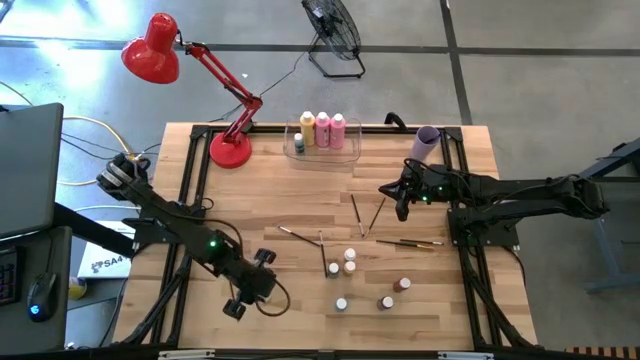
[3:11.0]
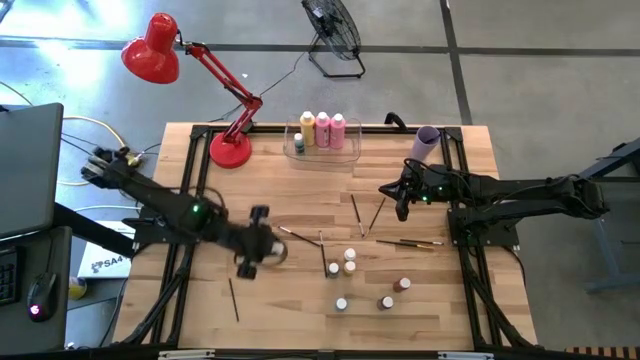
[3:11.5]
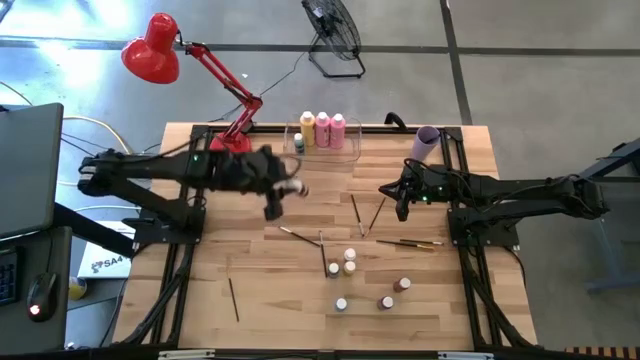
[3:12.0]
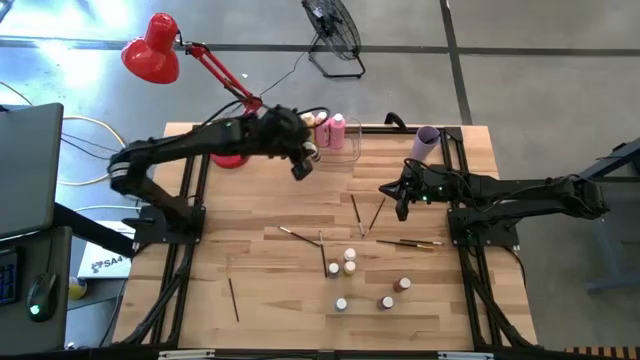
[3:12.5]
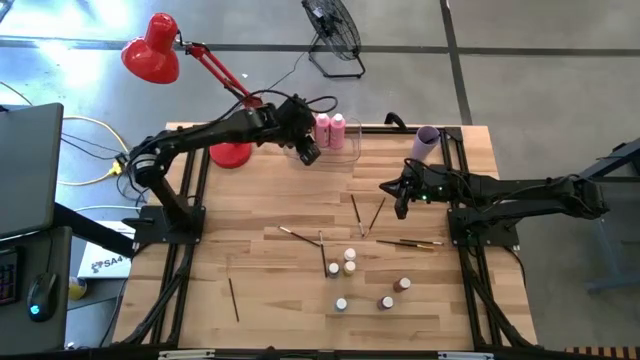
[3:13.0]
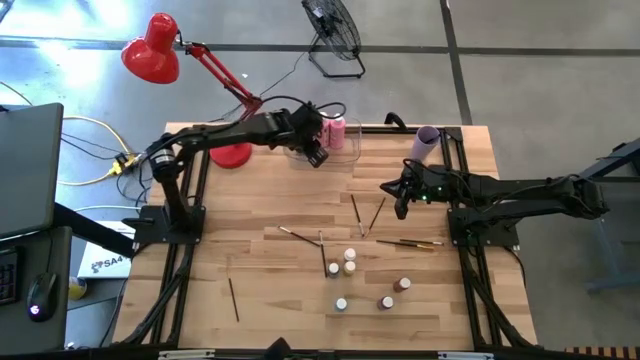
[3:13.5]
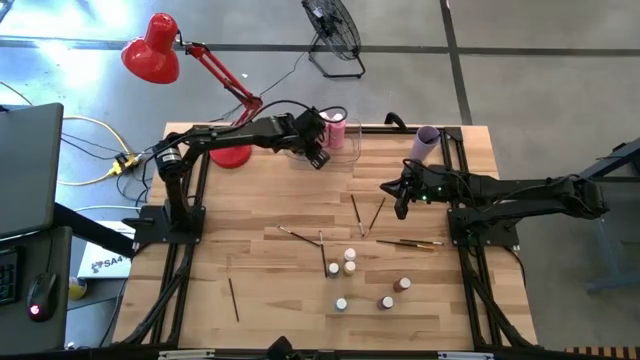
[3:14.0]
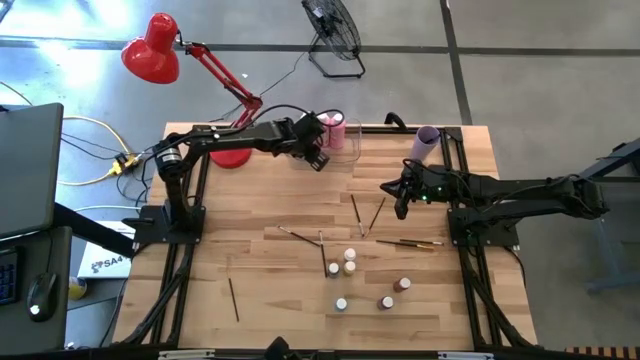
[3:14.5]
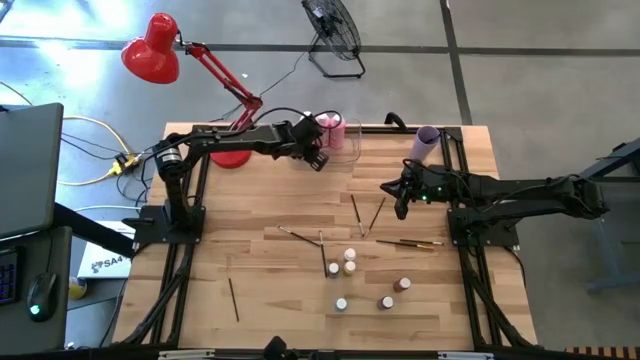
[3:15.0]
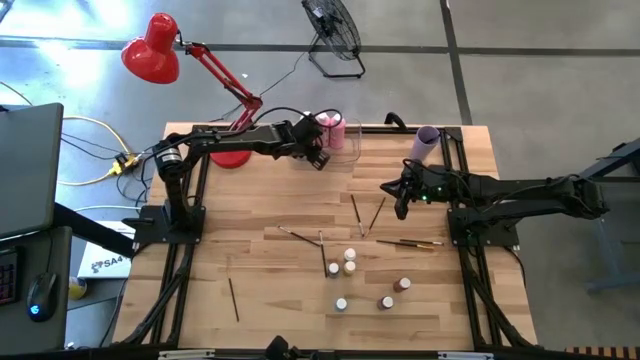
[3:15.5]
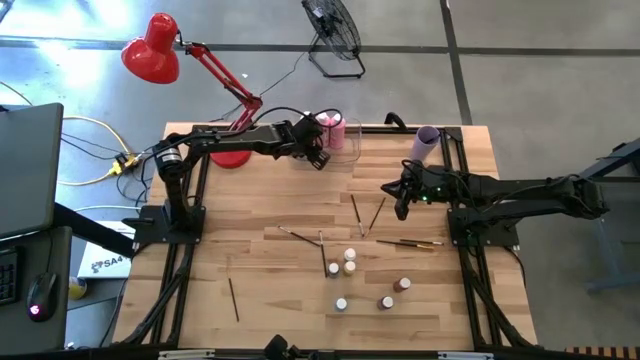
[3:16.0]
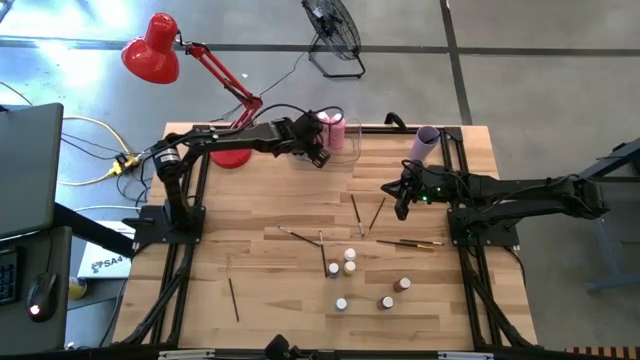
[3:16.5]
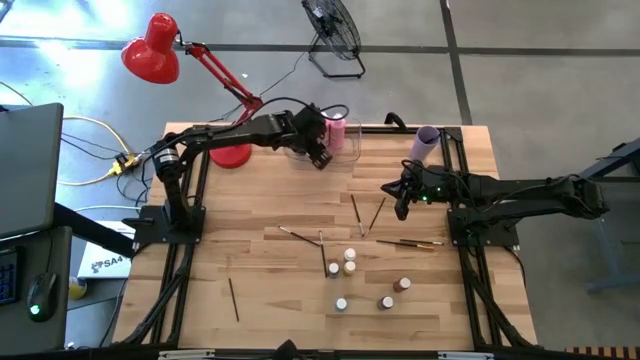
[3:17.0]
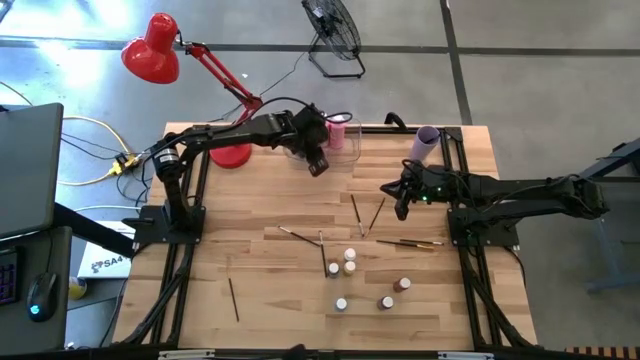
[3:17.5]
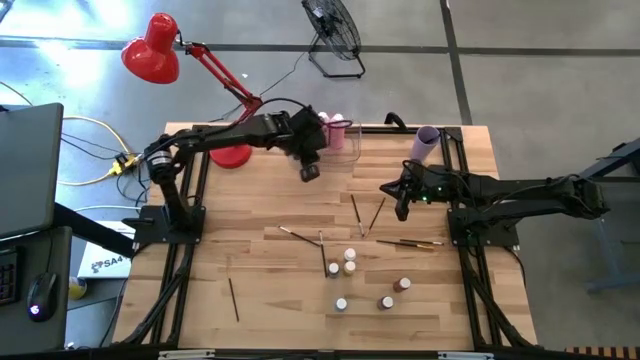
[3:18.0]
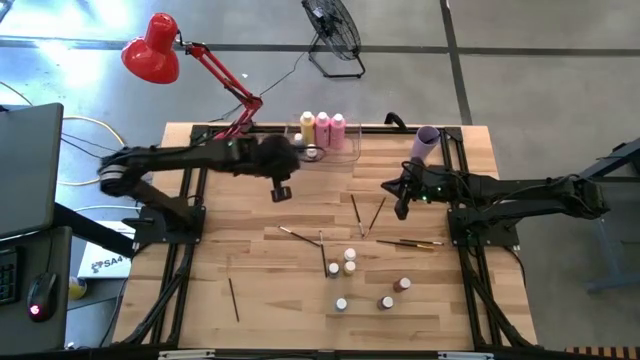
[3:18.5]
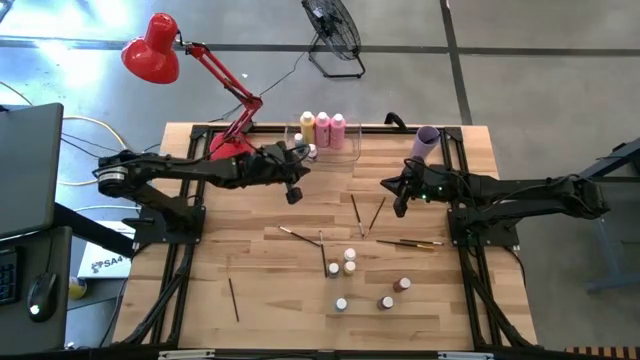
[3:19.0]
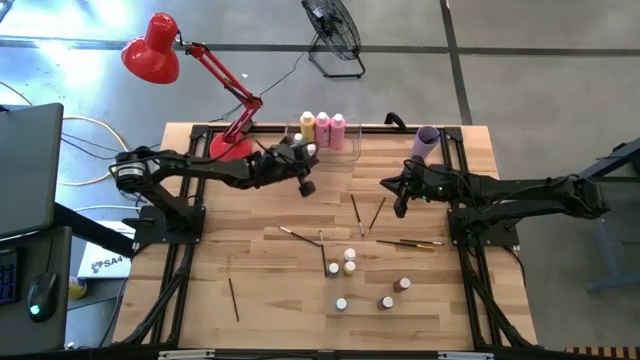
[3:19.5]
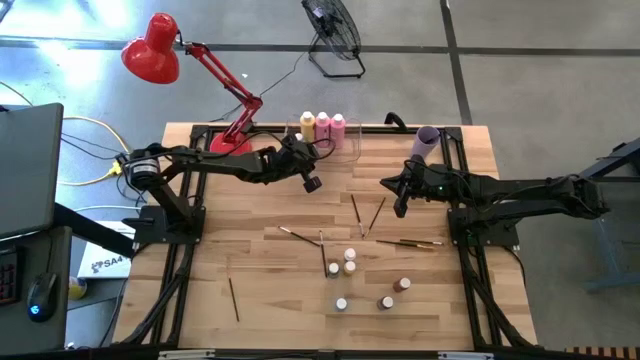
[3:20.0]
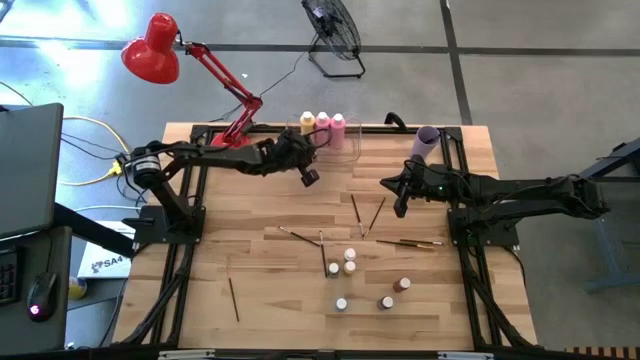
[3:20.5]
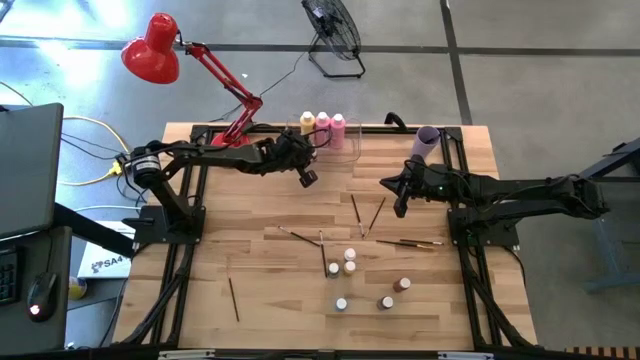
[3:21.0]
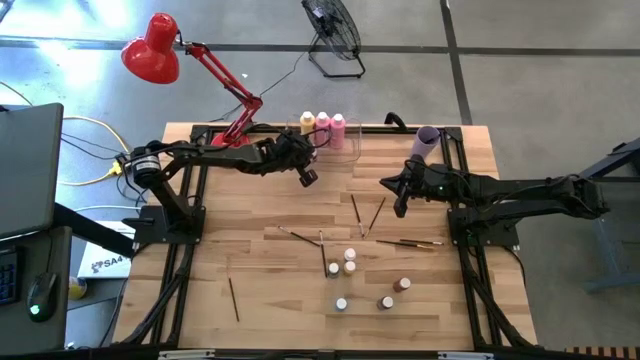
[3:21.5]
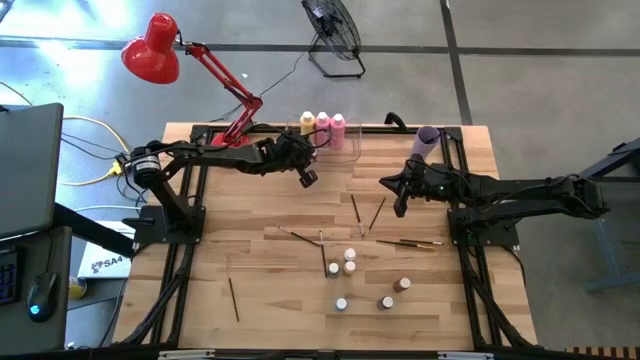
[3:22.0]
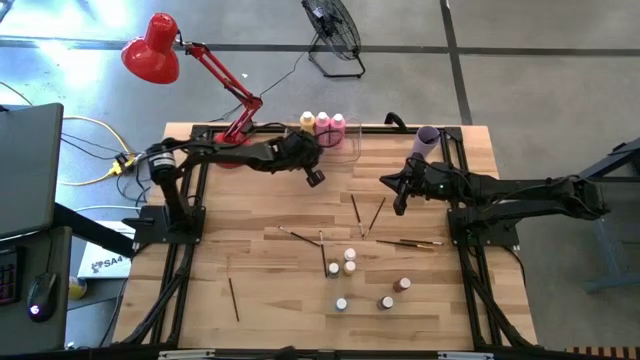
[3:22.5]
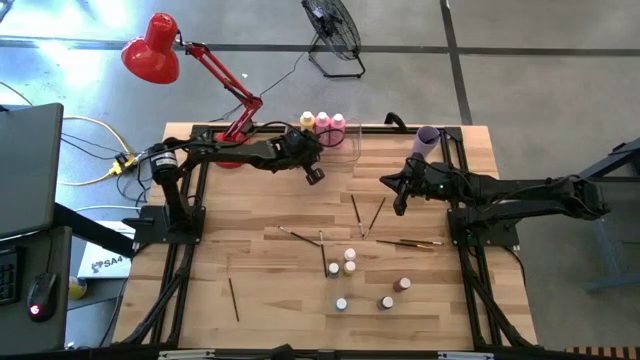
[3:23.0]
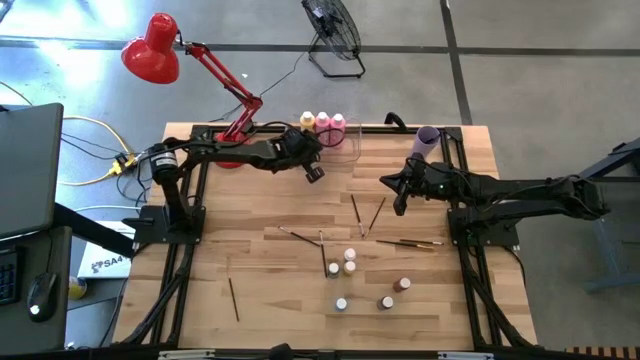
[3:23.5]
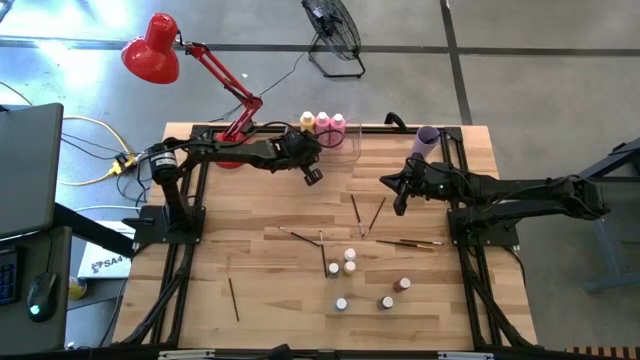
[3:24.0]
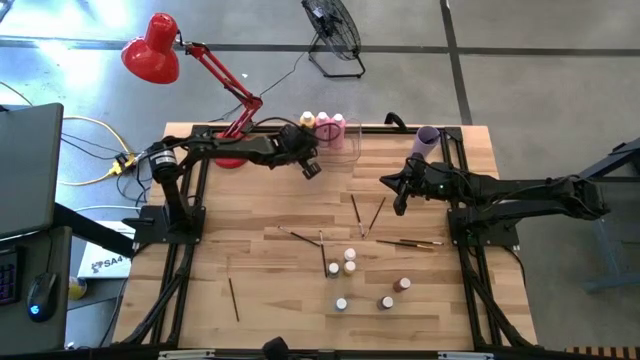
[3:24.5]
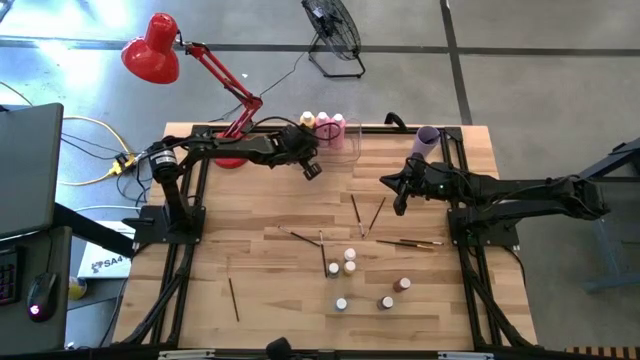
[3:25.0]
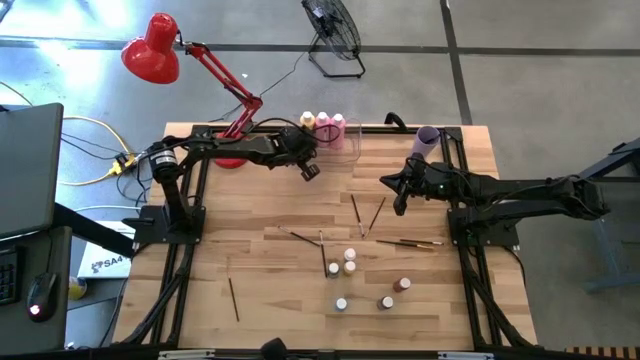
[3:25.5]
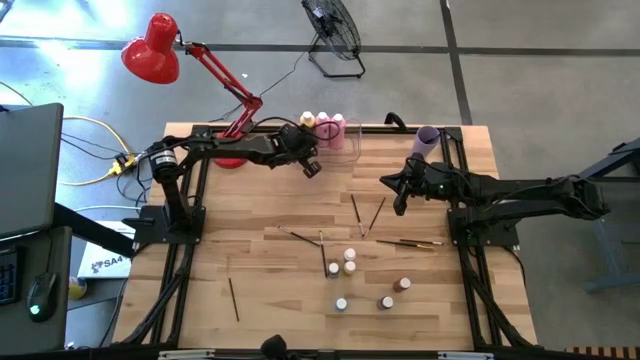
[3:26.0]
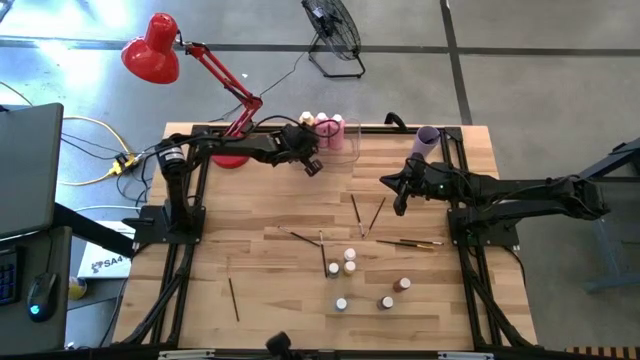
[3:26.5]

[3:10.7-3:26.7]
Task: Pick & Place Paint Supplies
Put the small white paint bottle into the transparent bin

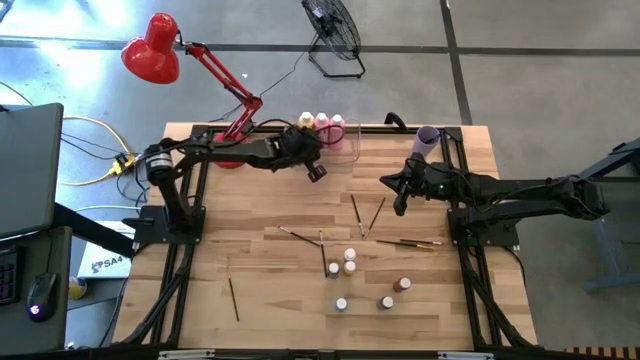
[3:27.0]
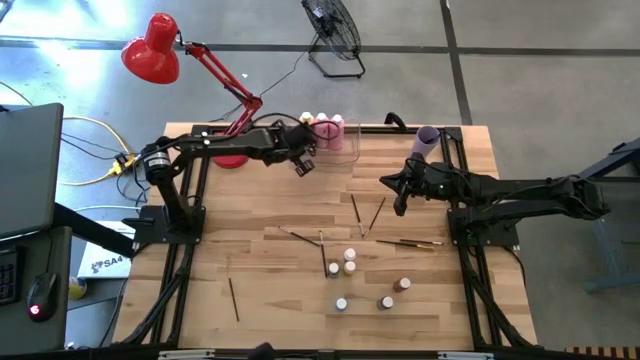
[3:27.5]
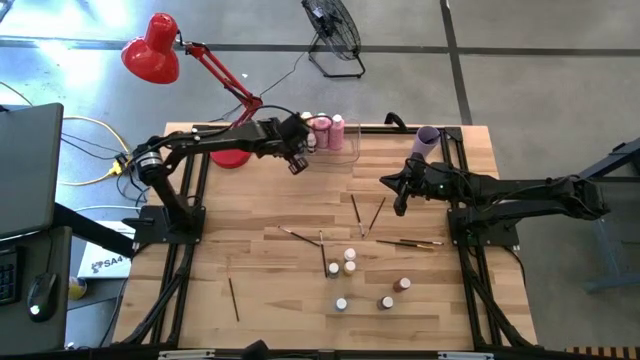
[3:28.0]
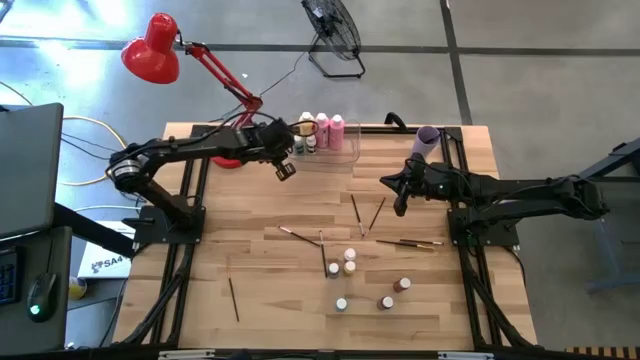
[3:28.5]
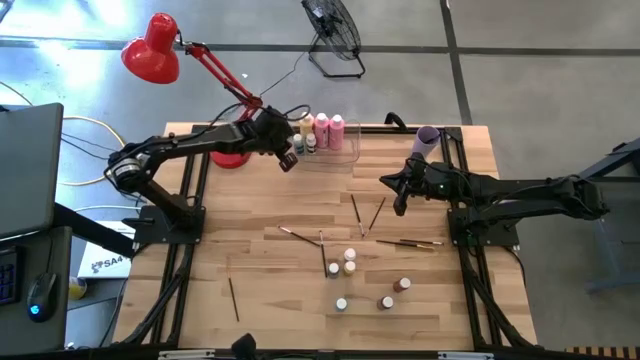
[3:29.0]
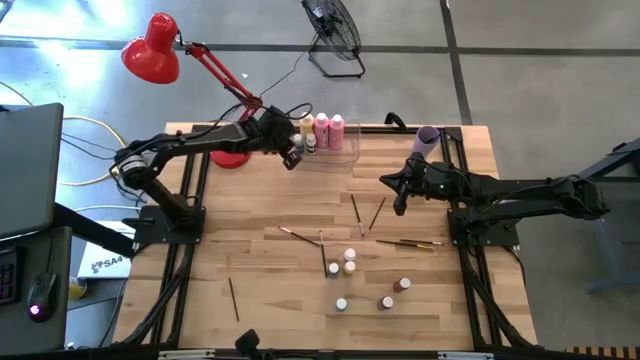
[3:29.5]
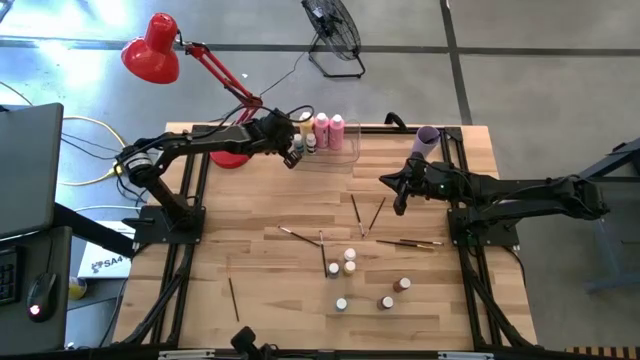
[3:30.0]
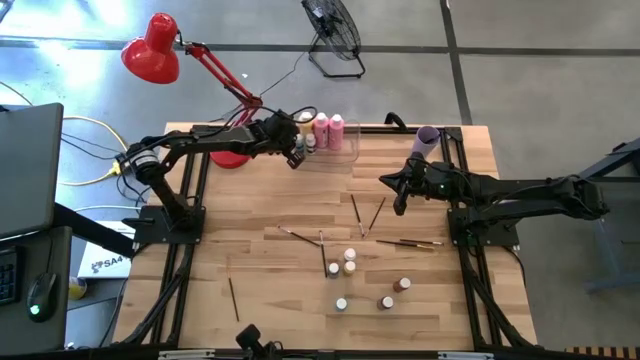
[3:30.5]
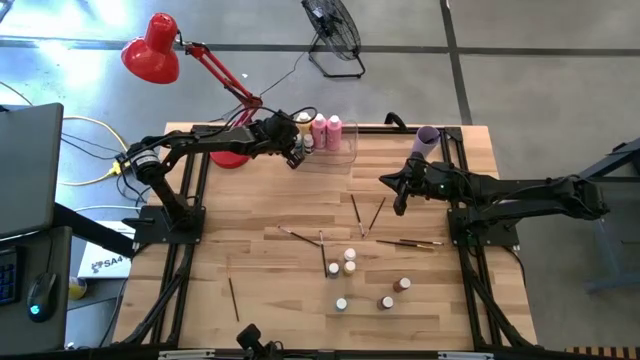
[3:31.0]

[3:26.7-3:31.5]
Adjust the small green paint bottle in the transparent bin

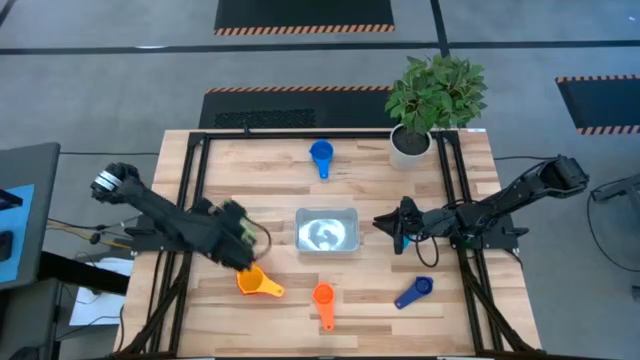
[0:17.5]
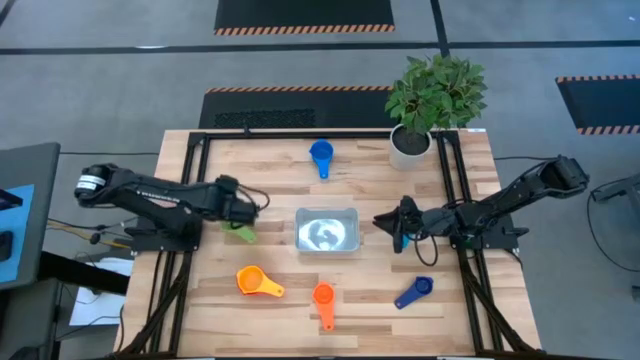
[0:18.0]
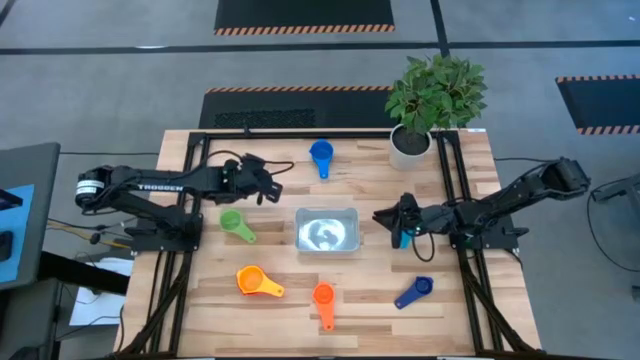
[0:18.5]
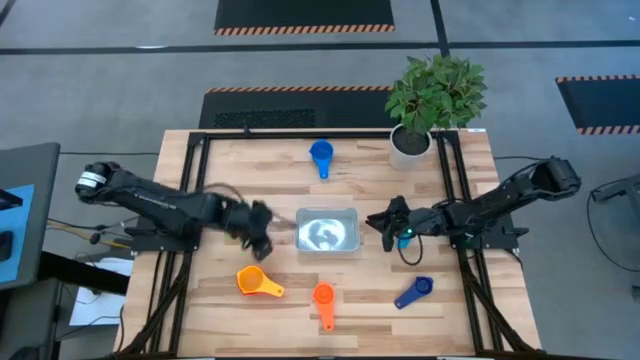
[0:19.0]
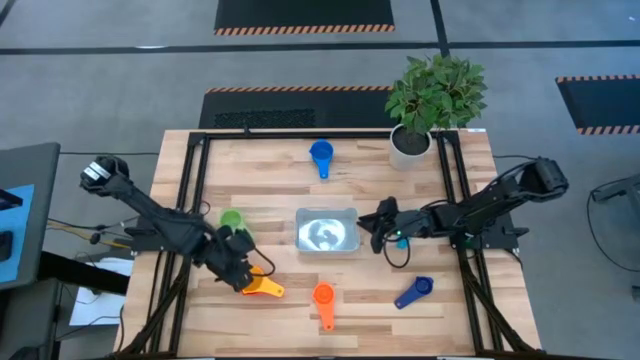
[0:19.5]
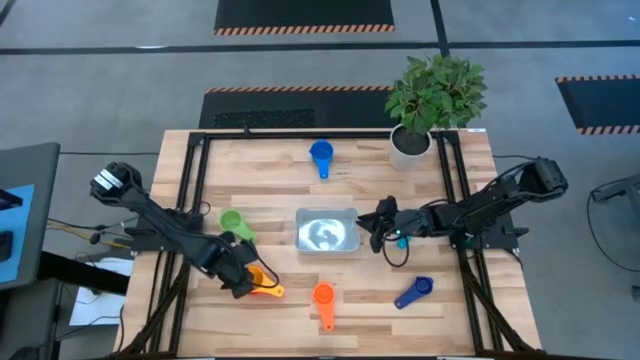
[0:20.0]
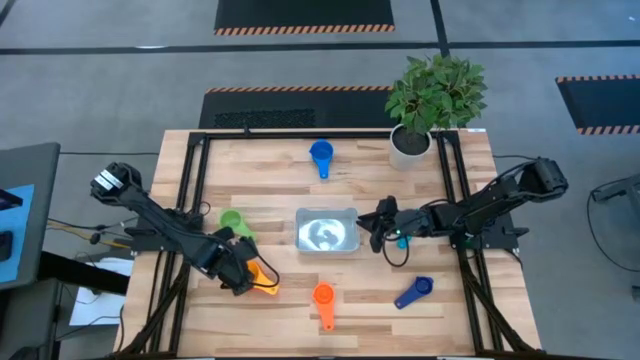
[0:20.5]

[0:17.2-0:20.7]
Task: Nest measuring cups in basket
Remove the yellow measuring cup from the red measuring cup
